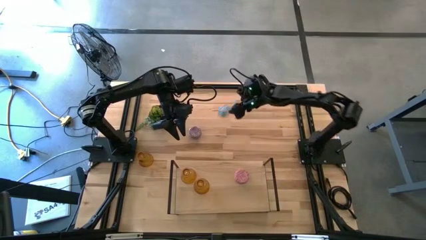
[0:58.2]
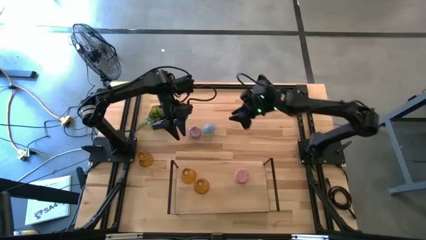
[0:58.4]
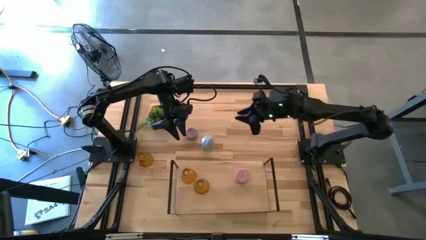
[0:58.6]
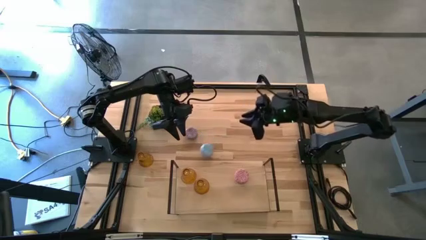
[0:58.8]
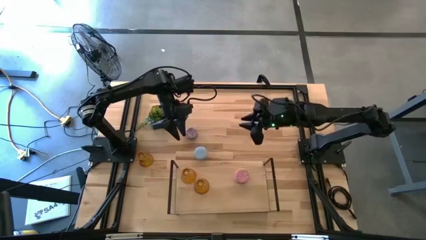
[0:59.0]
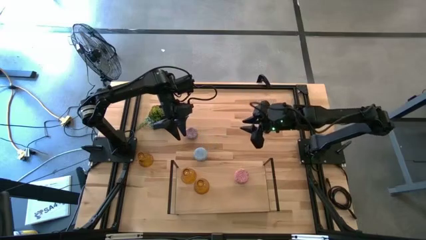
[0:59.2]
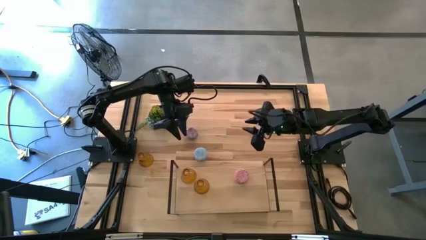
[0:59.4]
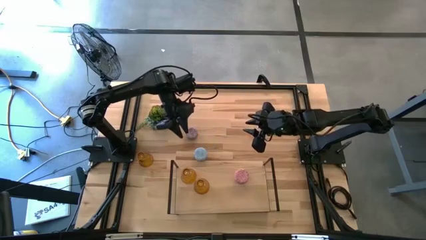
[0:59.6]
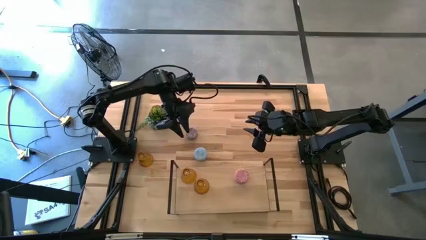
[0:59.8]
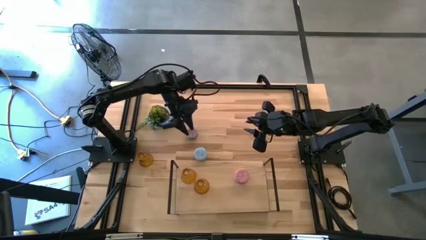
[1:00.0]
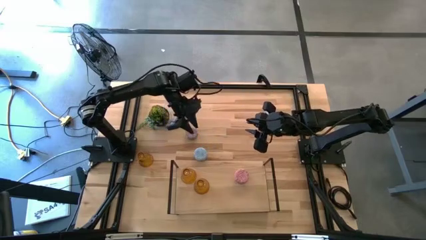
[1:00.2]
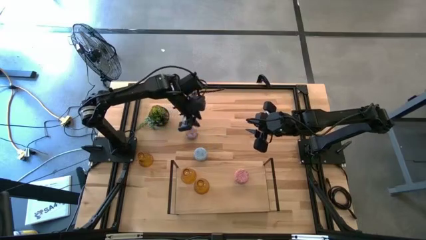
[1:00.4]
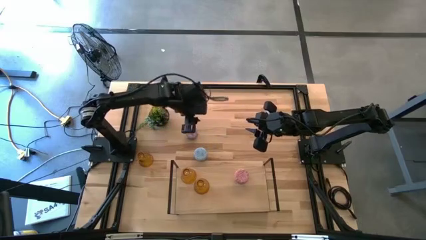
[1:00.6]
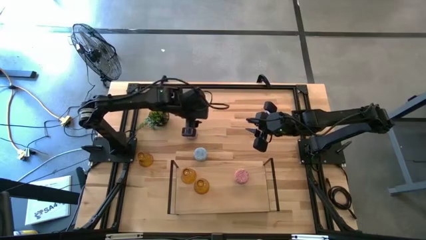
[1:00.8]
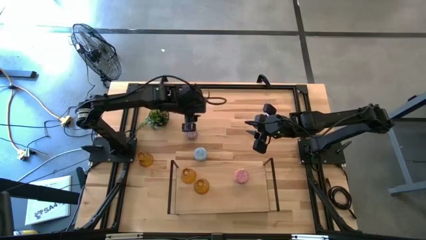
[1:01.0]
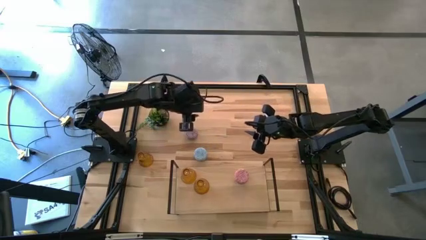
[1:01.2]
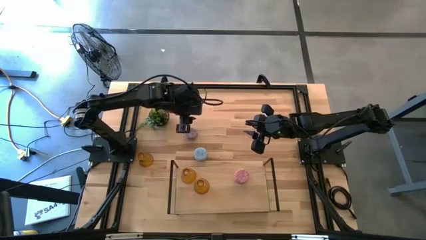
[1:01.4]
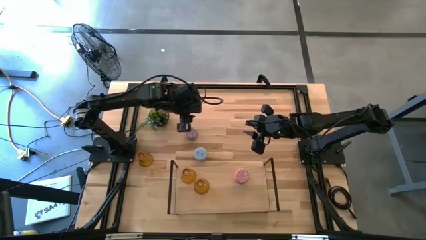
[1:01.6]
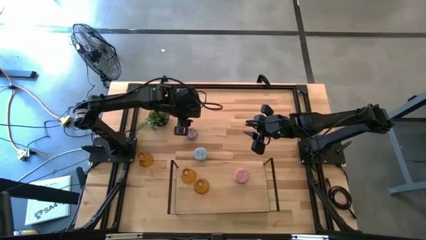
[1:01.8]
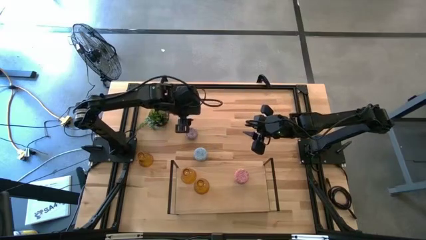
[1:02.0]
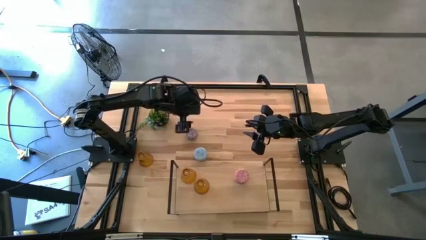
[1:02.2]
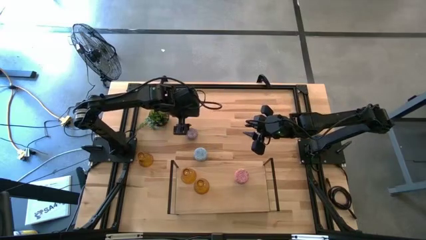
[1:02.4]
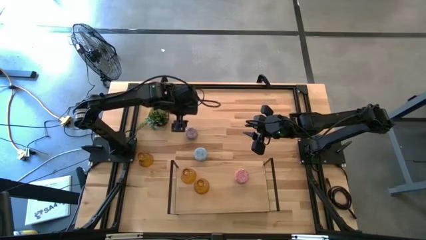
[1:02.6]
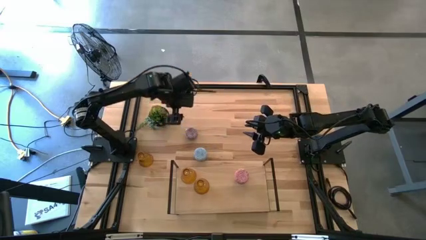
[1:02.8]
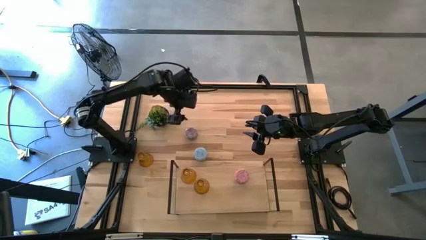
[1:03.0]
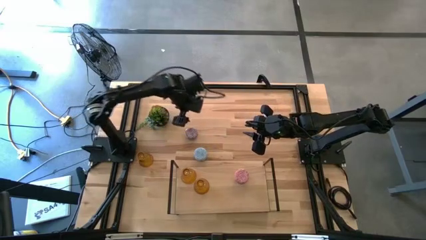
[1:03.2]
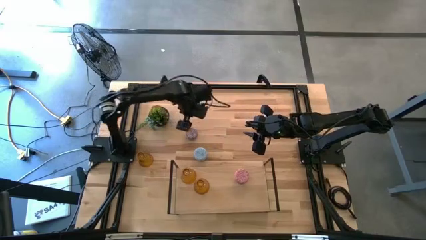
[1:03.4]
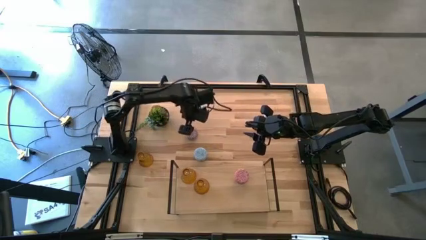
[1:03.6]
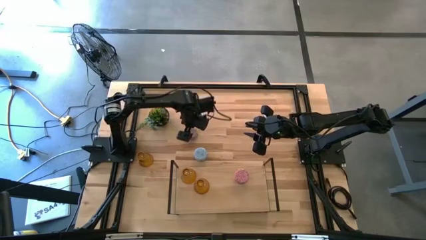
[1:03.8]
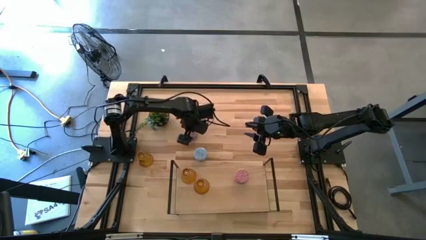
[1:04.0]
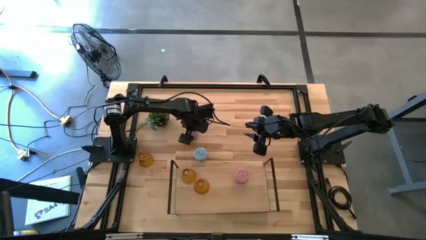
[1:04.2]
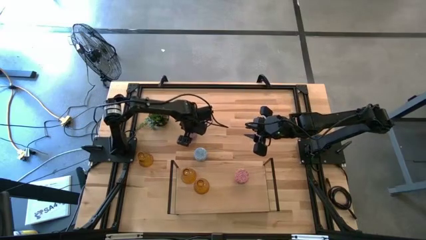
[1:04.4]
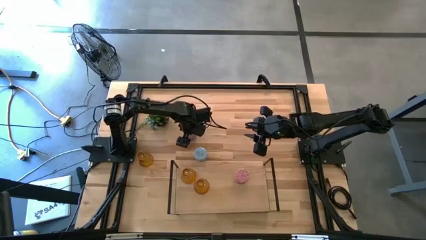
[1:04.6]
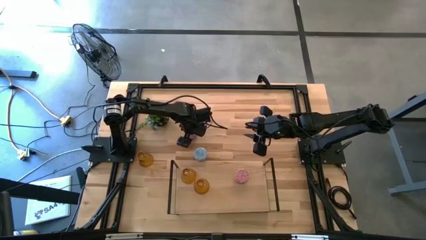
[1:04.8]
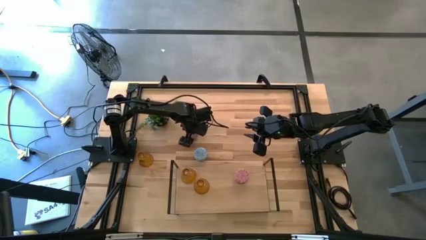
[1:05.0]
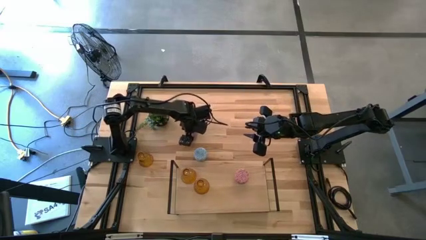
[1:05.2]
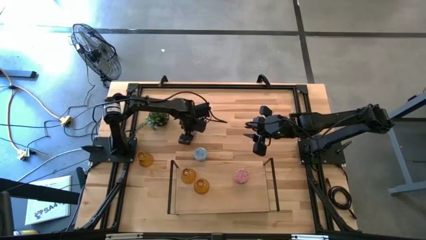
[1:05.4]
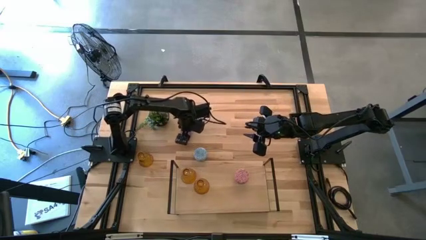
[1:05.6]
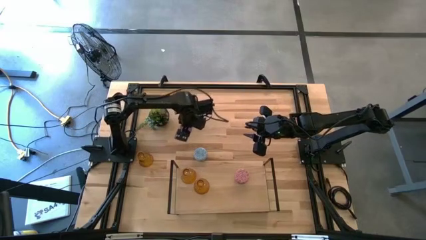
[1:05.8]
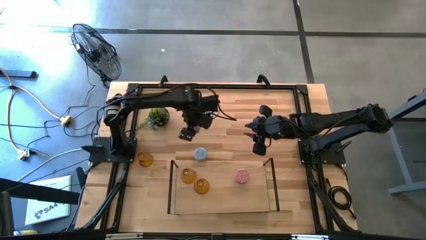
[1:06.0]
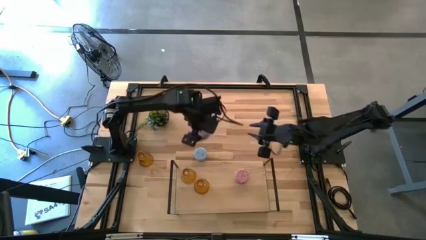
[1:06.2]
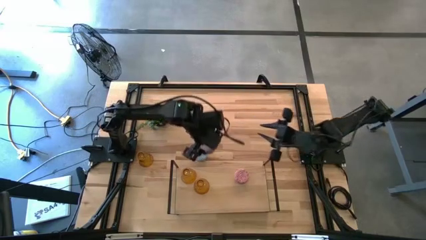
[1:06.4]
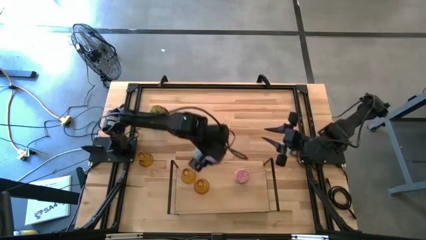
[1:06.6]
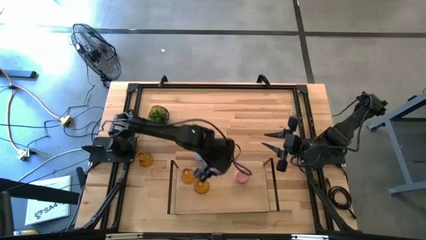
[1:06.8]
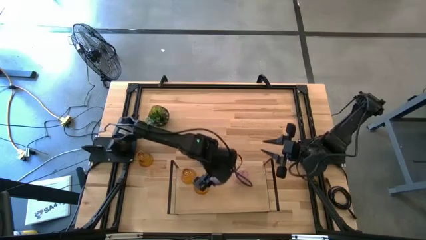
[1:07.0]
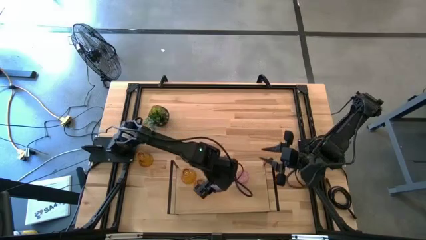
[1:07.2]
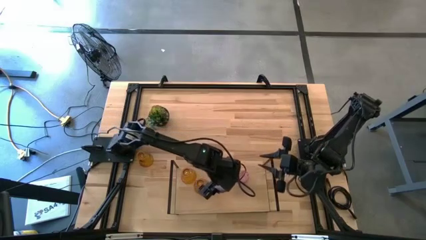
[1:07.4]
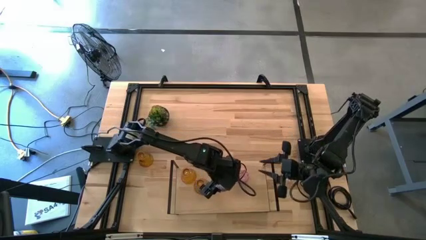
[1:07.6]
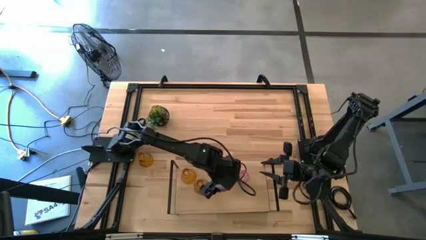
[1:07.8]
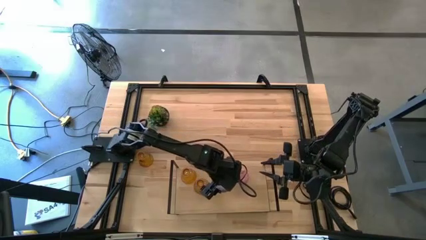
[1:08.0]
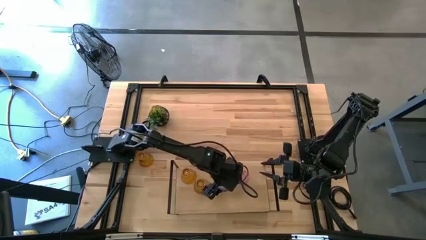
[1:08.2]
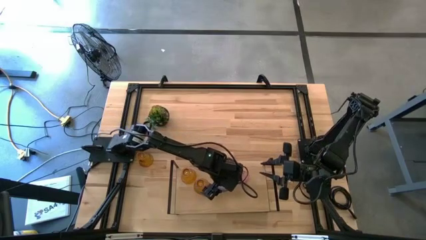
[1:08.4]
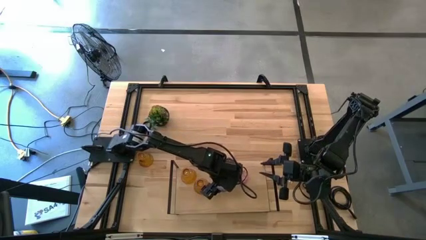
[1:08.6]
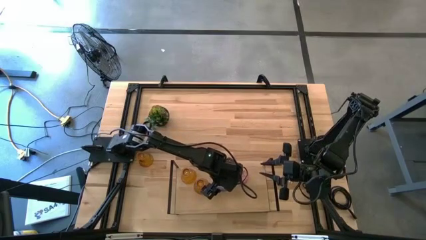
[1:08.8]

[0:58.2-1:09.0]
Task: Pick & Place candle stick holders
Put the red scented candle on the shelf

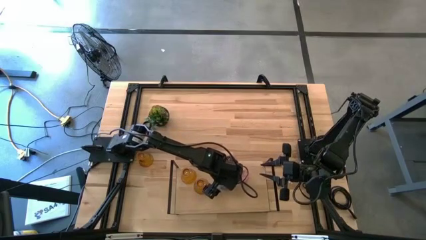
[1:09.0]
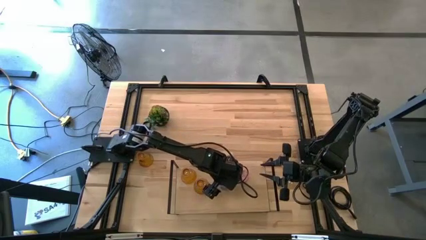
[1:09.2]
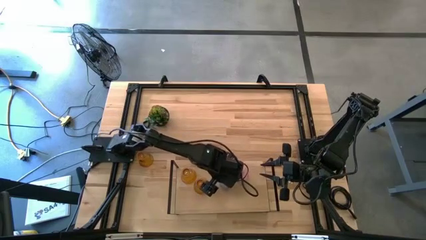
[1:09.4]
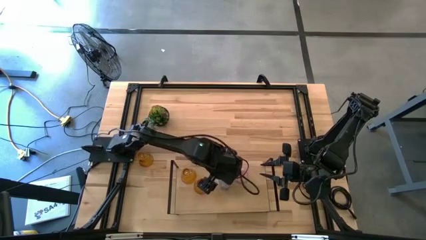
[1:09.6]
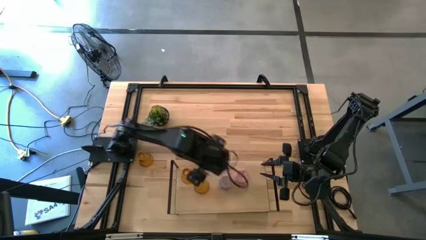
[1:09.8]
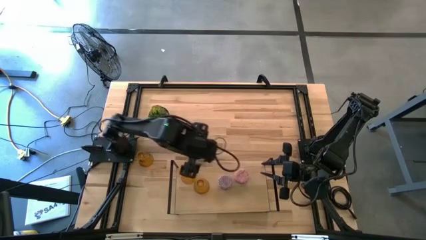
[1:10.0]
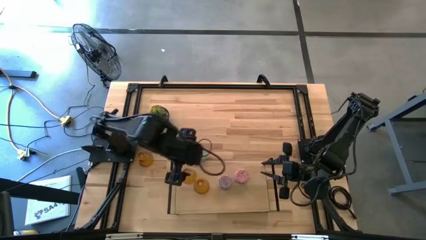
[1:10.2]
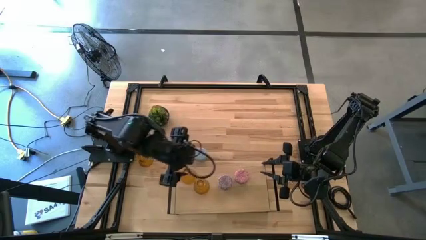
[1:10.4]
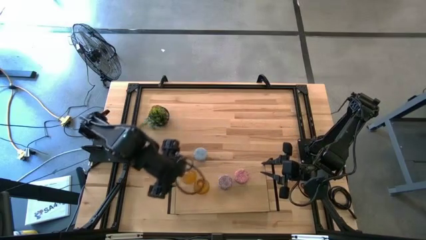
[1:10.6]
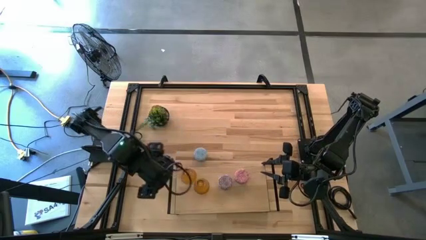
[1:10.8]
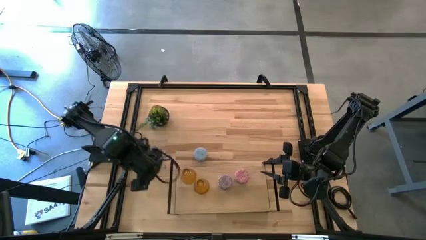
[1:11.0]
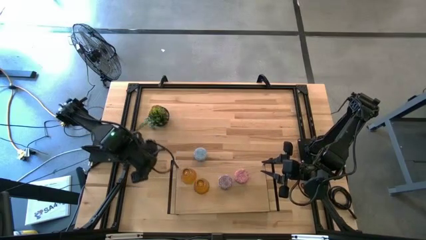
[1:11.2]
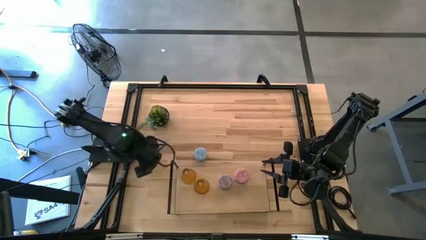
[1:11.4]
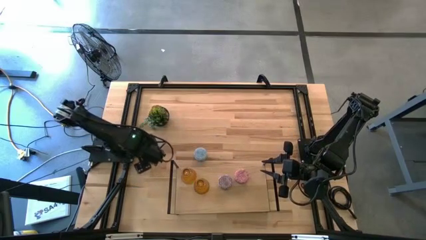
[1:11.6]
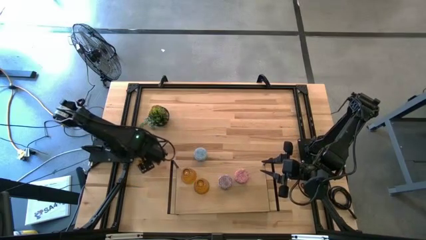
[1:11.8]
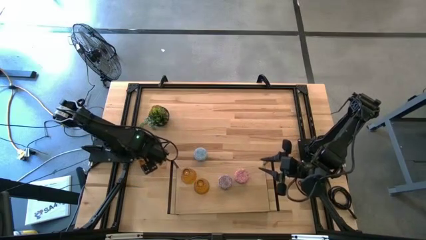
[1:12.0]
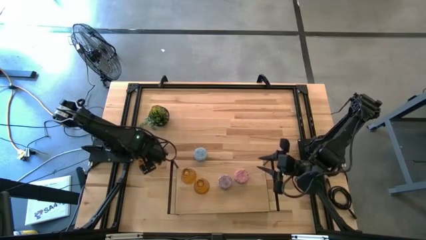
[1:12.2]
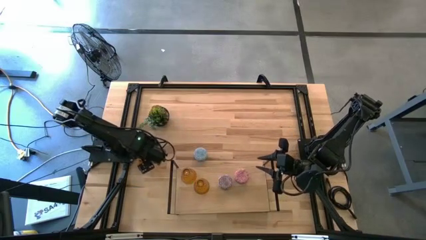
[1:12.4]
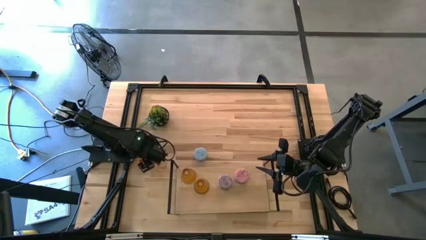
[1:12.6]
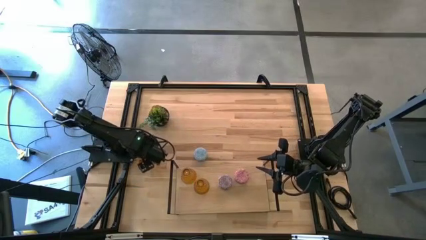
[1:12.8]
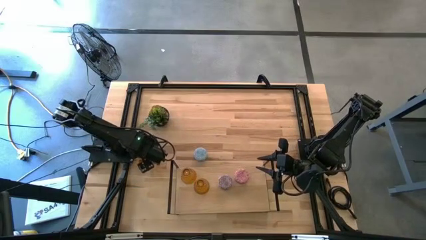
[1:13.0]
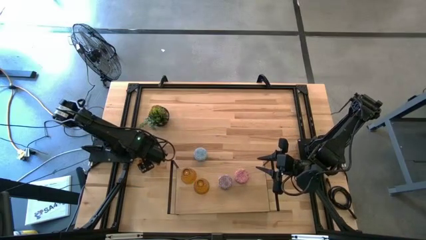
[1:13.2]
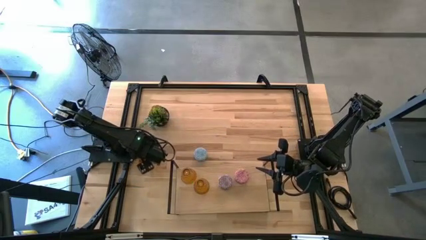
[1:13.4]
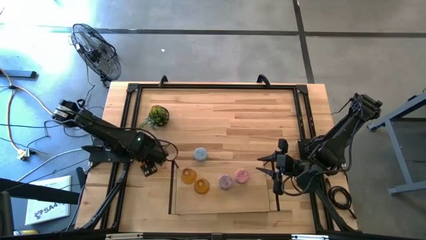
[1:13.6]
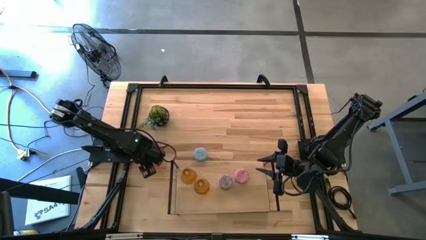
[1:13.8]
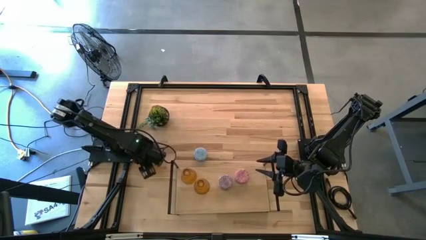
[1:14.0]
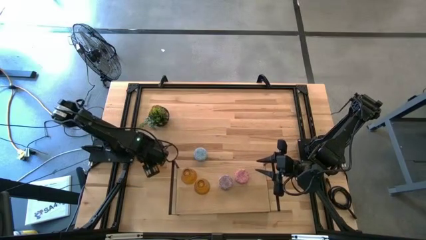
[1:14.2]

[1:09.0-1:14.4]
Align the gold glass candle holder with the other gold glass candle holder on the shelf
